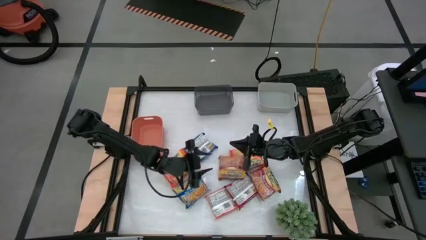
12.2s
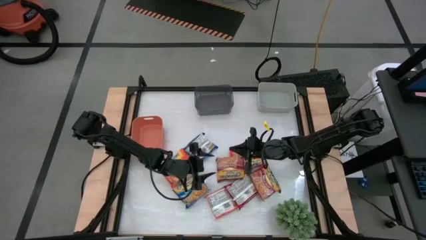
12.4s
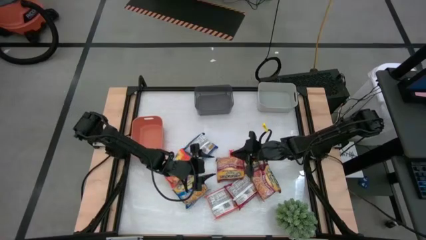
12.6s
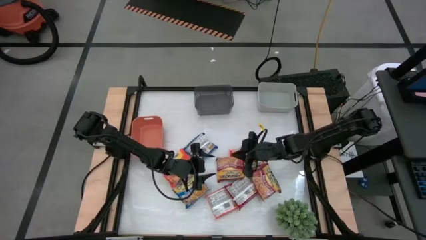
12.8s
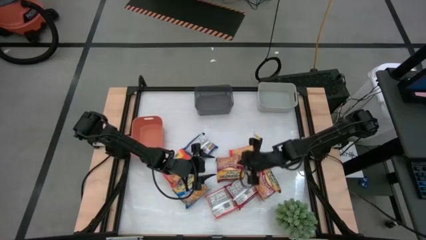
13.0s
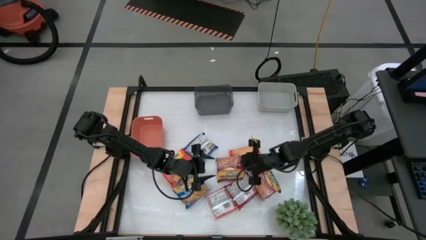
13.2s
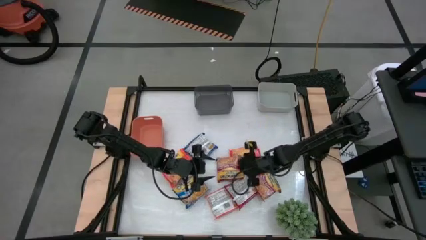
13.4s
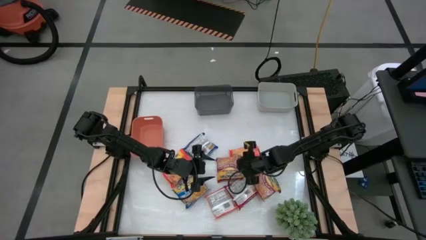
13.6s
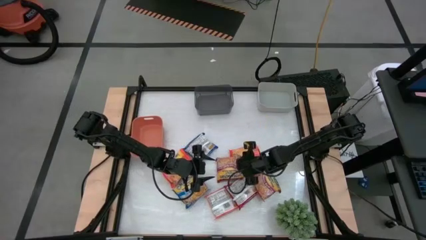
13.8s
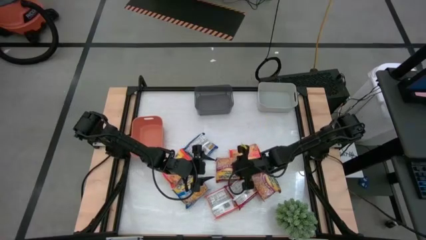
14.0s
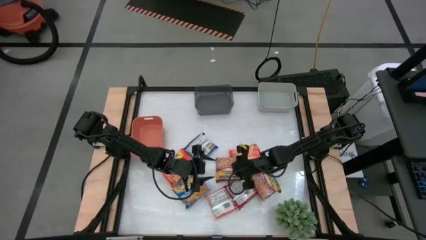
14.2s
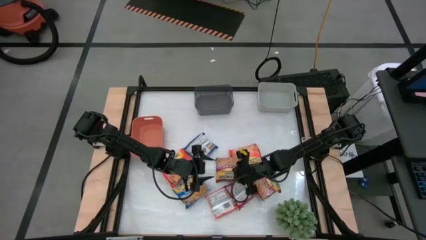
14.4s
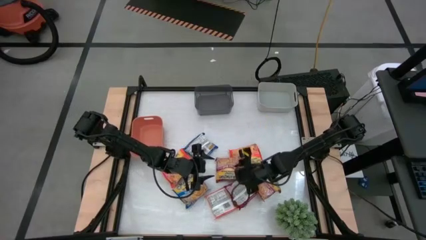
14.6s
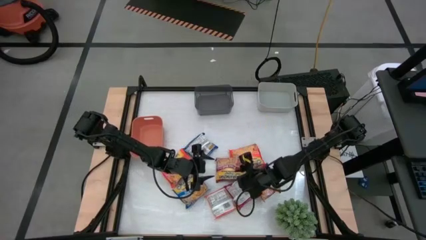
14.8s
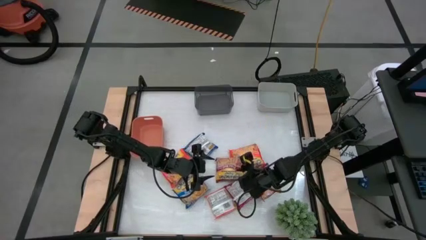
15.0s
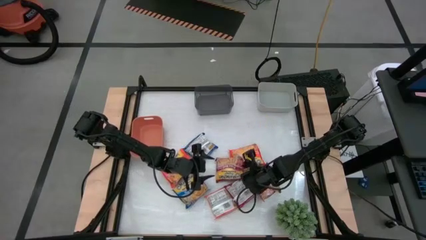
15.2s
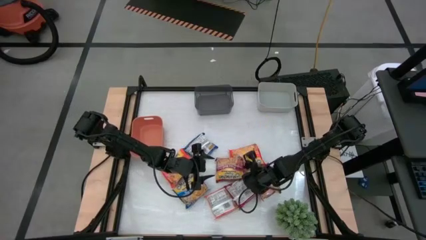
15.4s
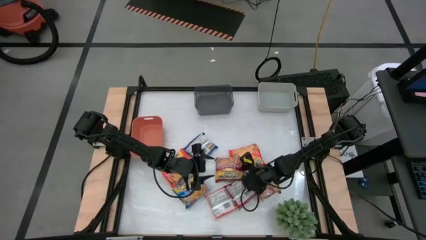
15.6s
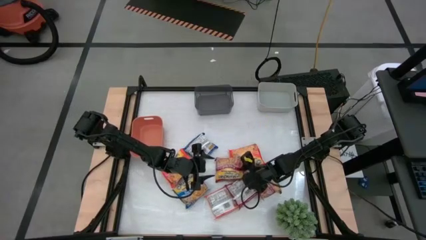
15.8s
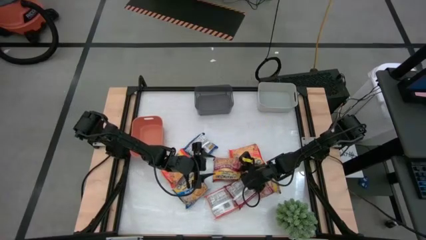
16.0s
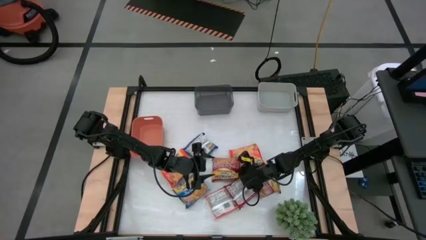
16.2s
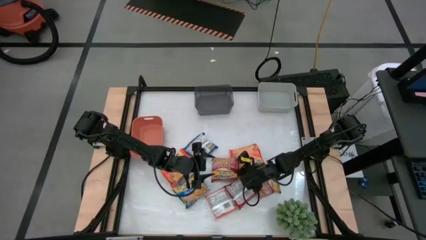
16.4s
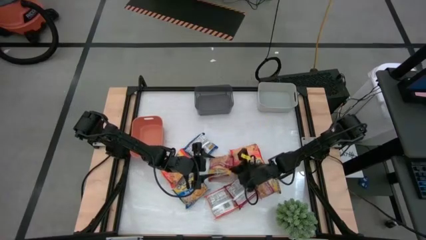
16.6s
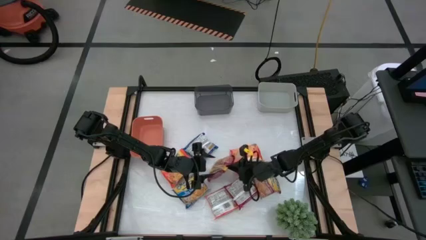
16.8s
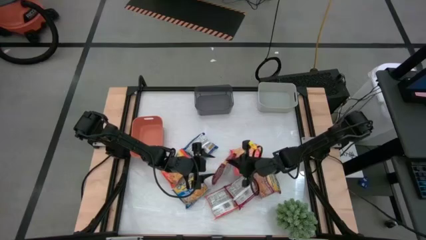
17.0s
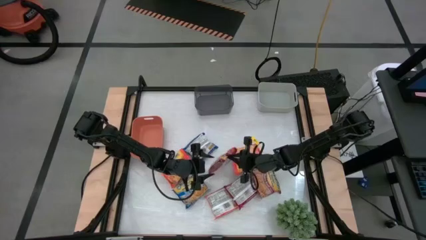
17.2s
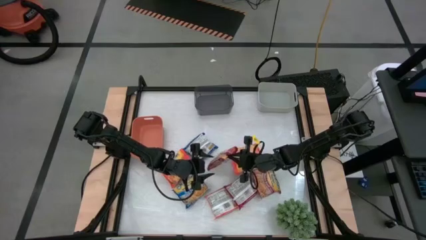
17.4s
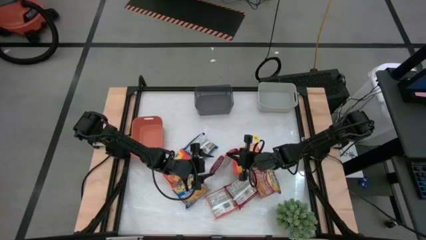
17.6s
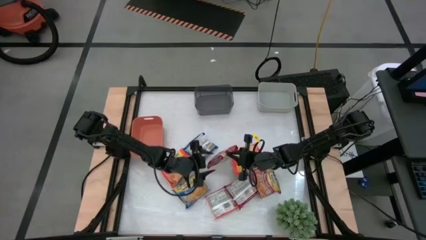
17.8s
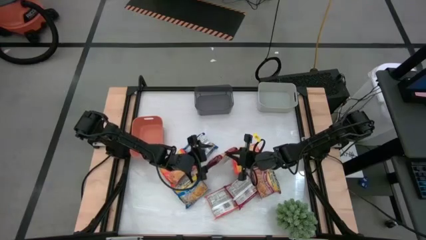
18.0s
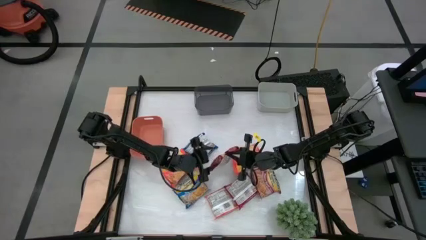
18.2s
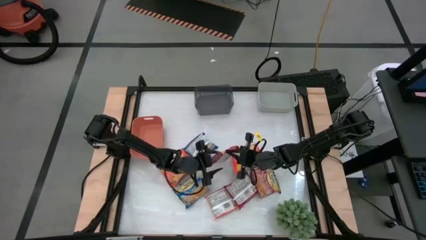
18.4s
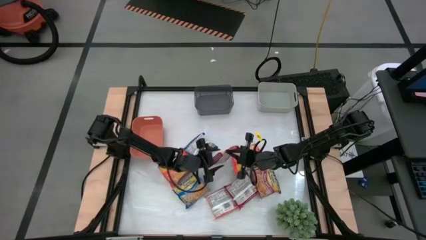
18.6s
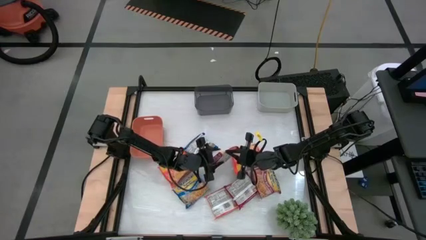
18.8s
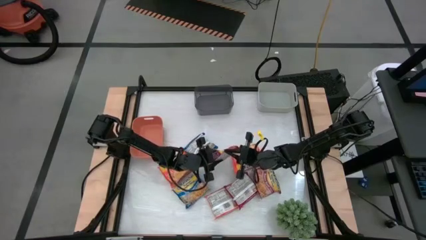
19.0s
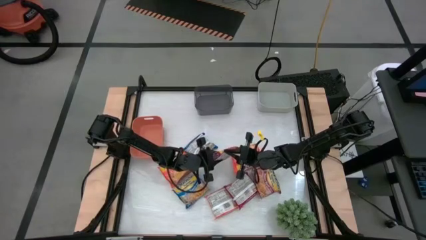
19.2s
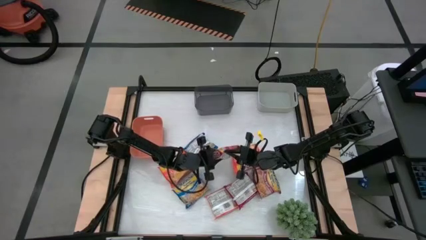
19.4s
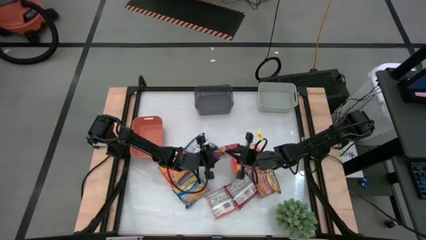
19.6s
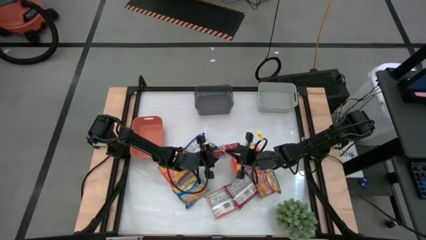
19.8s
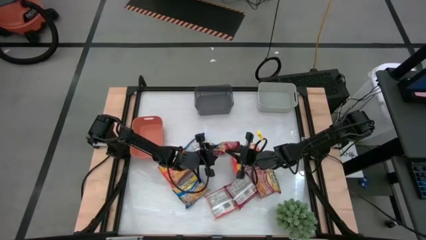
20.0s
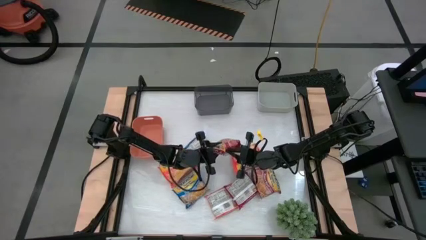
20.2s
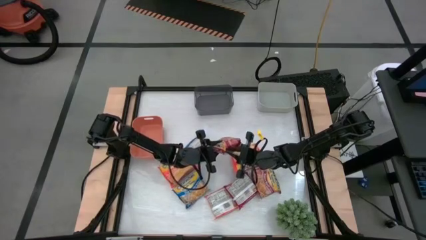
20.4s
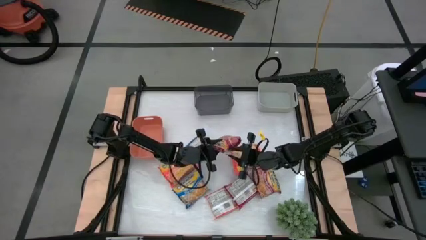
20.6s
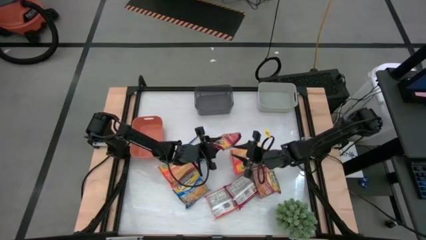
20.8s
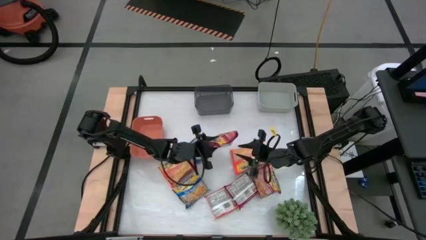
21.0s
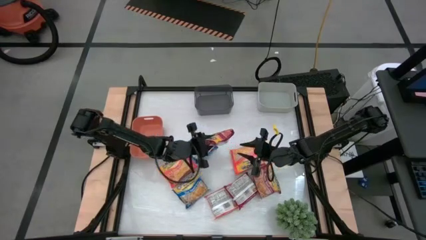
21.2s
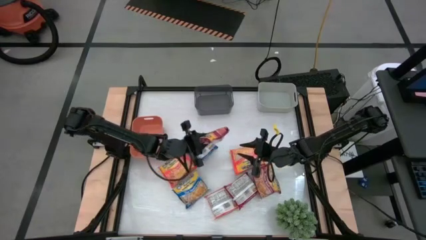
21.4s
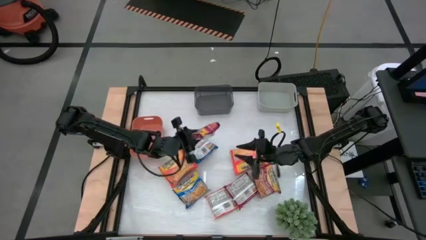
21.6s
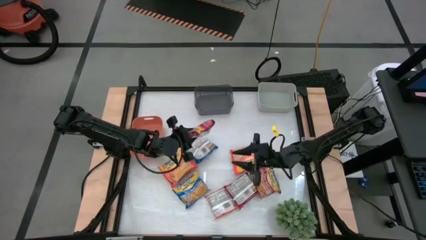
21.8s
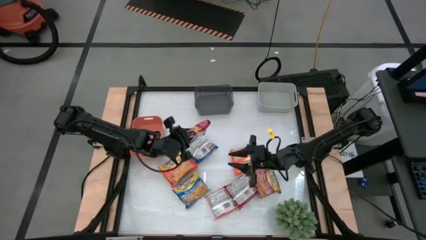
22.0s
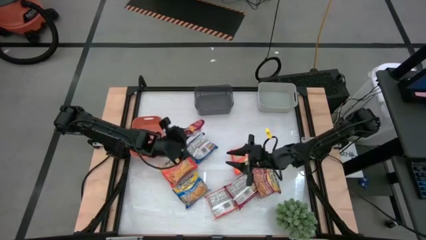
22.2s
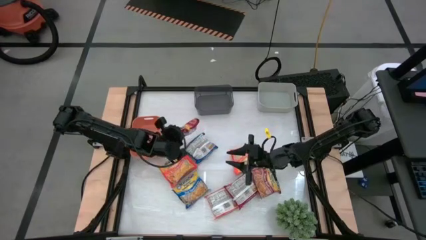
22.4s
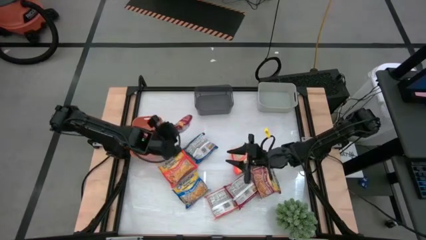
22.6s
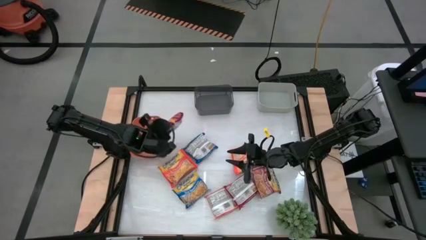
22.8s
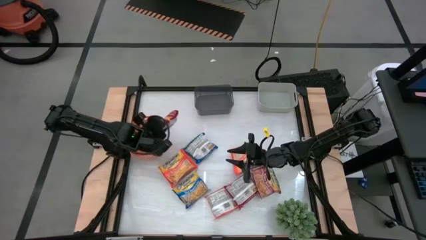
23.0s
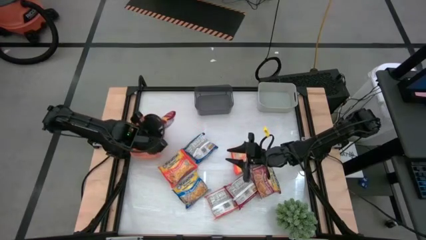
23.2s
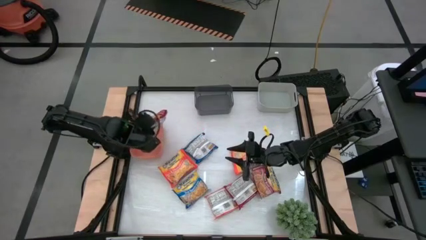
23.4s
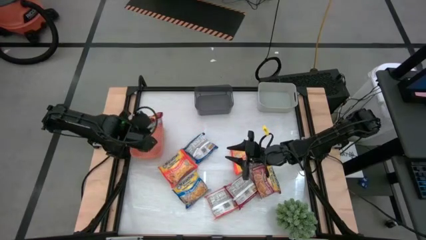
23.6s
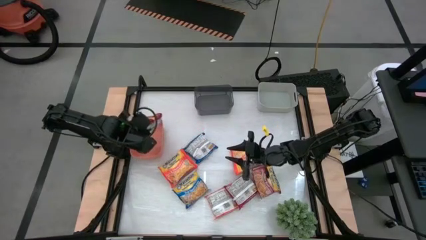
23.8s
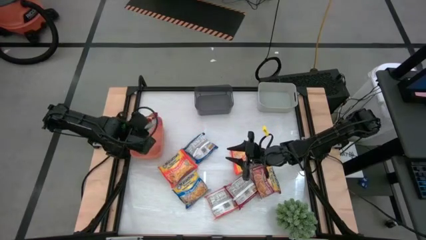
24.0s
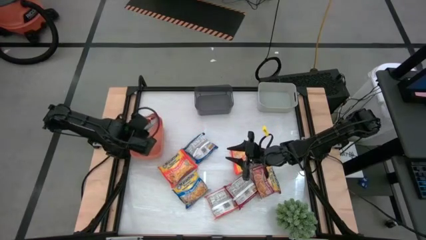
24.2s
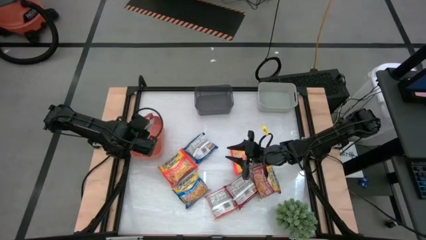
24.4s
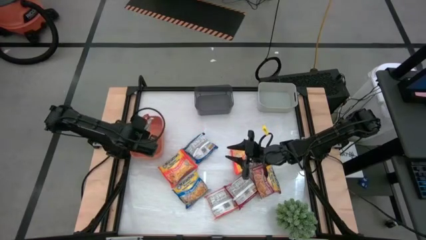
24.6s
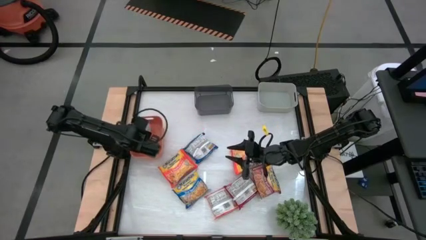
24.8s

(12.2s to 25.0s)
Task: Sort Maruchan noodles
Put the top red noodle pack into the orange bin

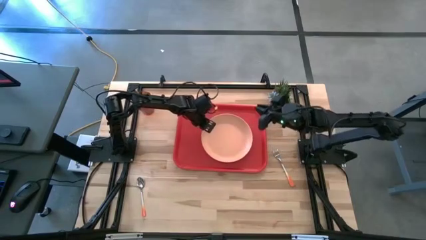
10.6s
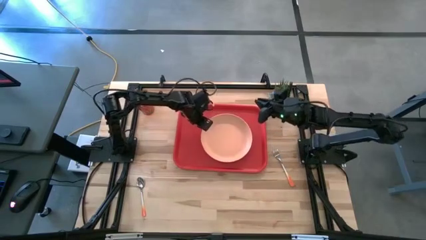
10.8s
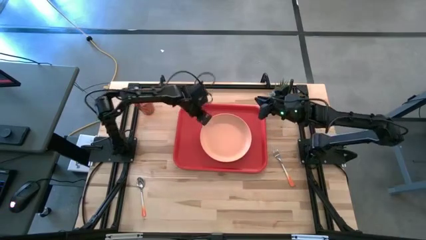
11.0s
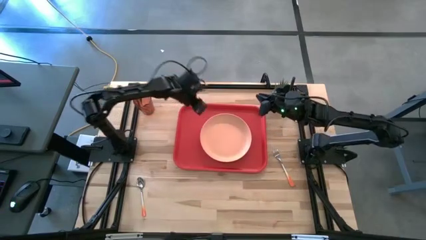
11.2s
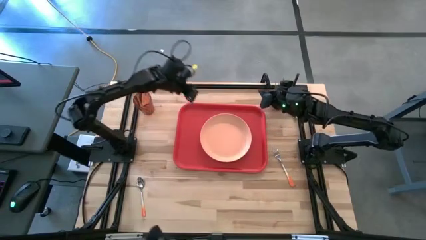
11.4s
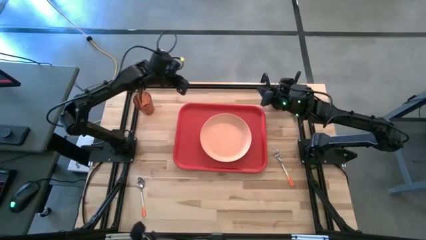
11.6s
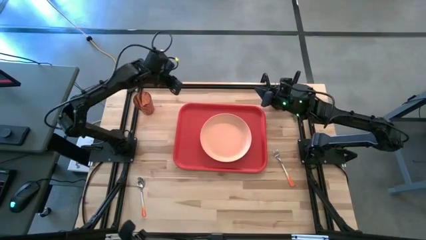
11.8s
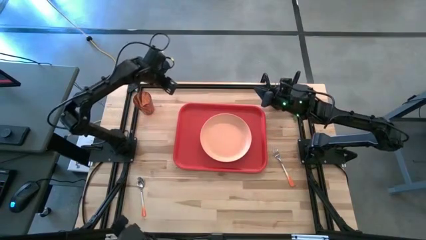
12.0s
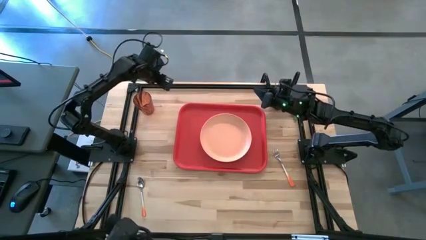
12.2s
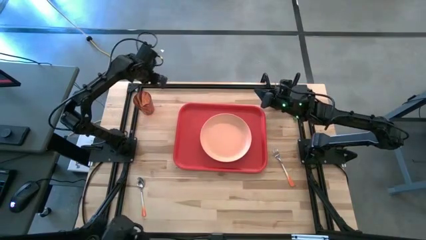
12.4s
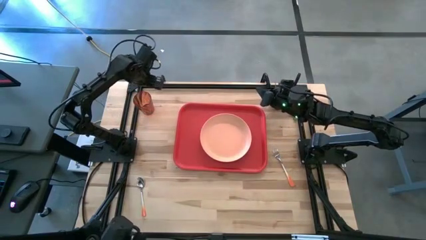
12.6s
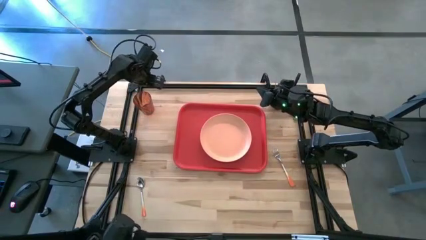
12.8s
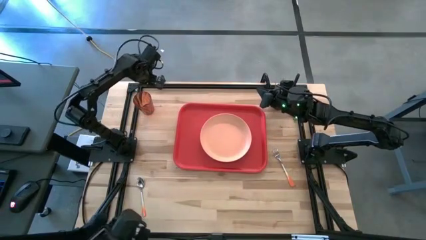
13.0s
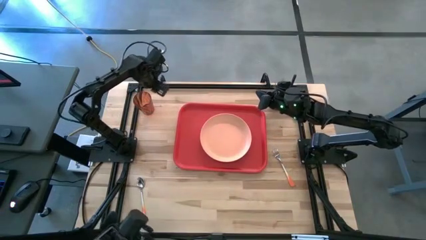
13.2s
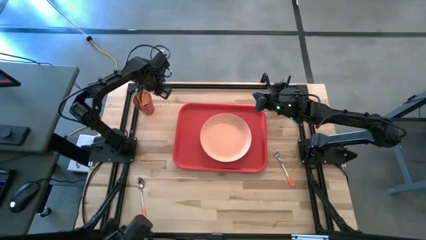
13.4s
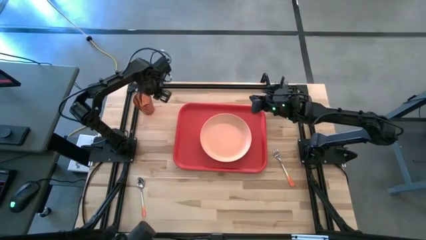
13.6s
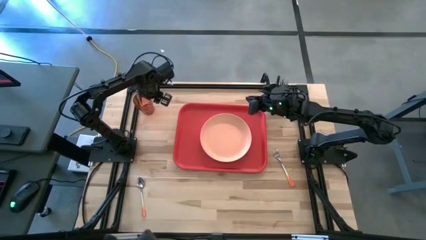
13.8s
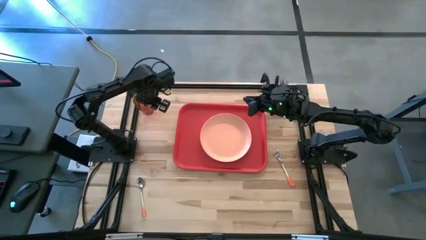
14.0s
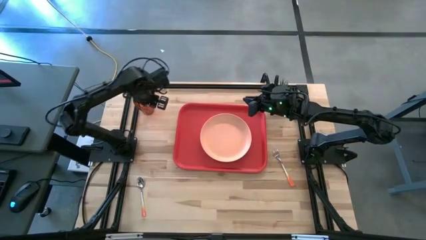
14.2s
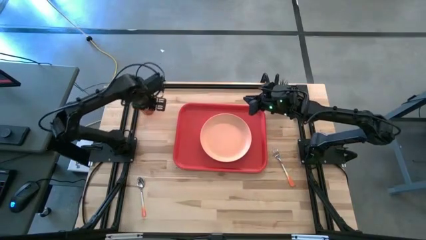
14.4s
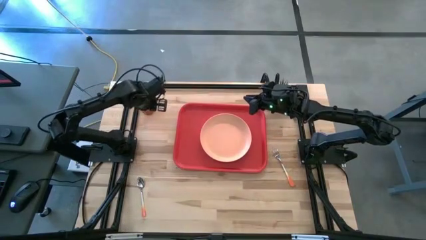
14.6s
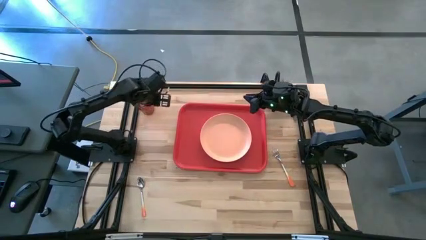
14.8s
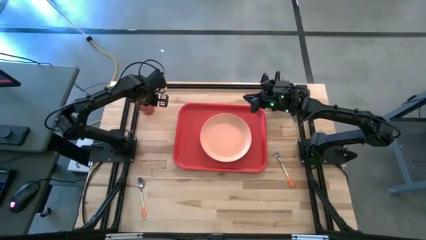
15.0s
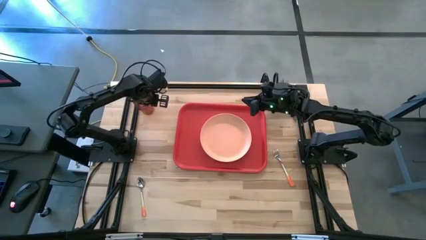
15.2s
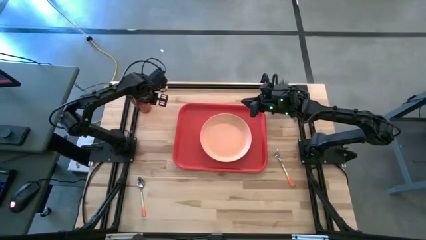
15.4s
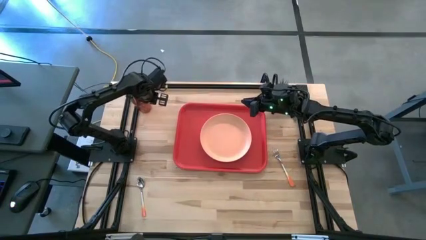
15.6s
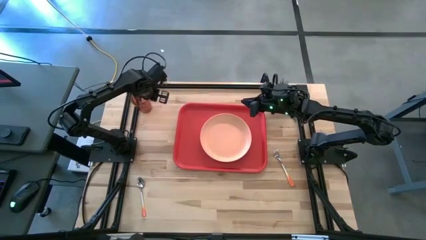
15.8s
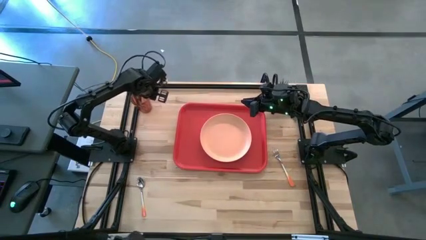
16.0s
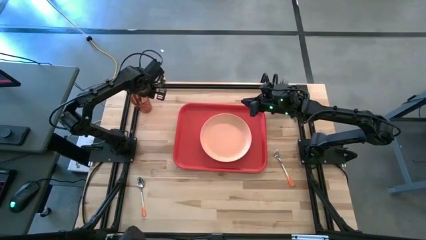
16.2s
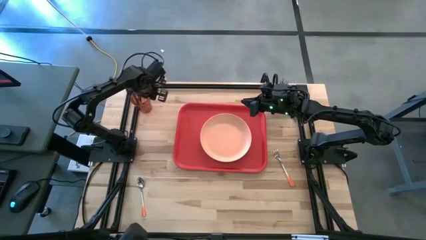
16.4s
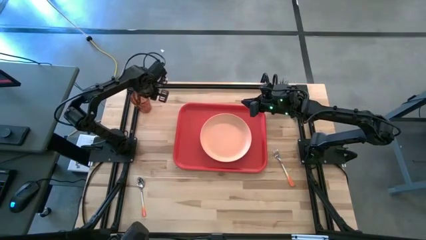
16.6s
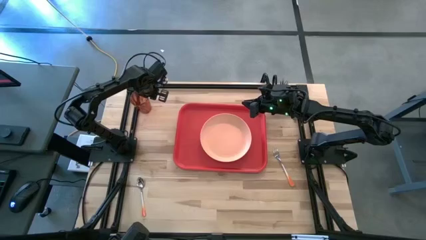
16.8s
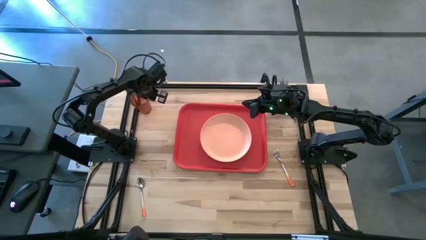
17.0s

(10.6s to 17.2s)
Task: Pick and place plate/cup/fork/spoon on tray
Put the orange cup on the top right of the light orange plate
